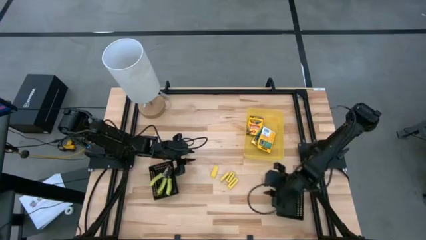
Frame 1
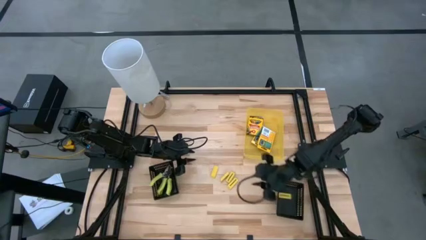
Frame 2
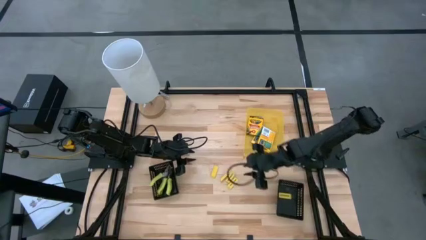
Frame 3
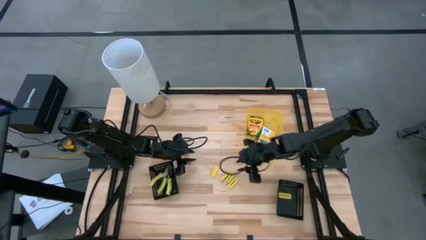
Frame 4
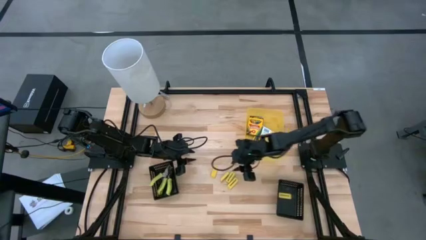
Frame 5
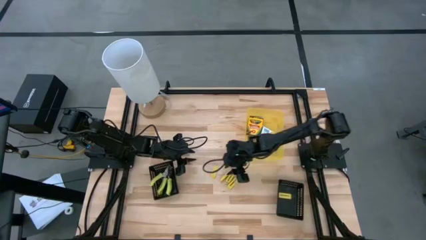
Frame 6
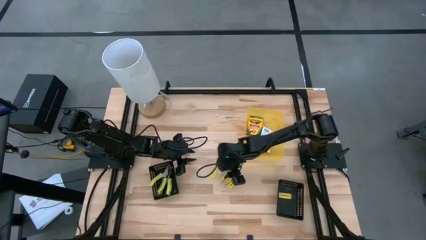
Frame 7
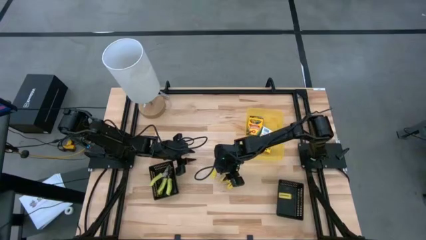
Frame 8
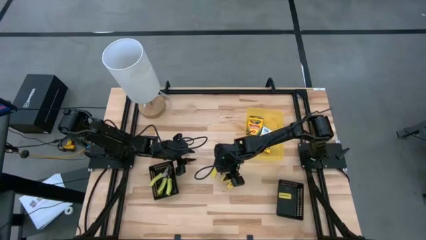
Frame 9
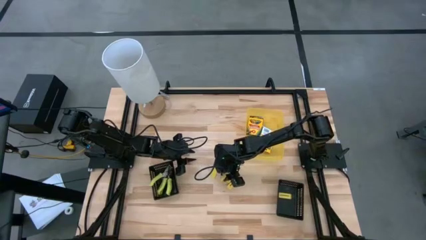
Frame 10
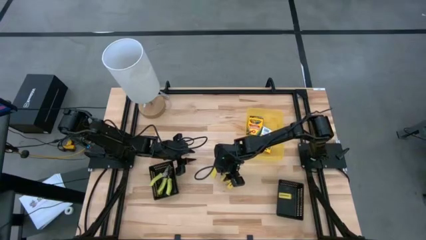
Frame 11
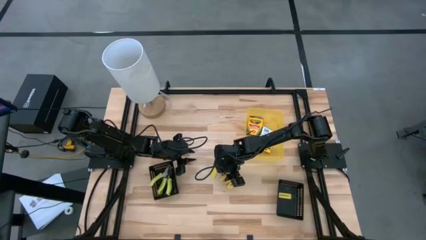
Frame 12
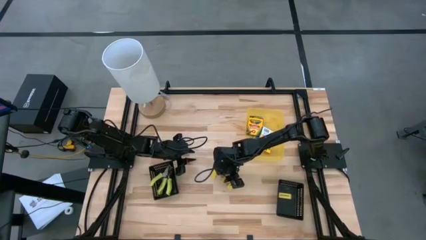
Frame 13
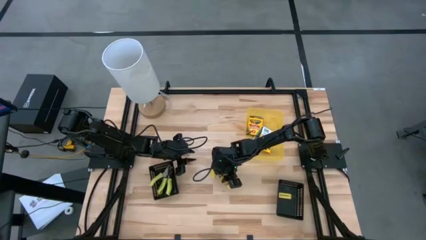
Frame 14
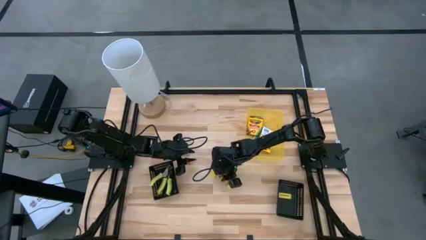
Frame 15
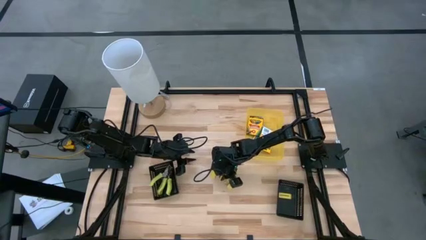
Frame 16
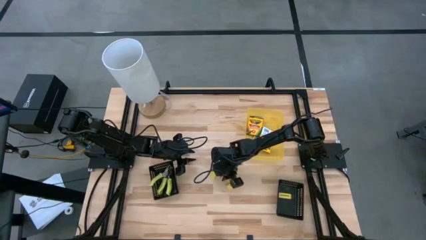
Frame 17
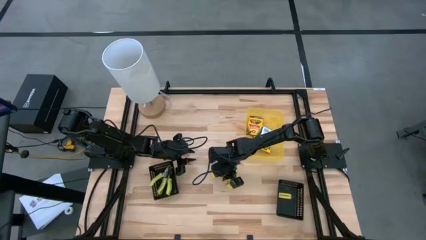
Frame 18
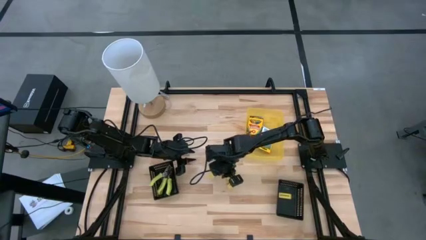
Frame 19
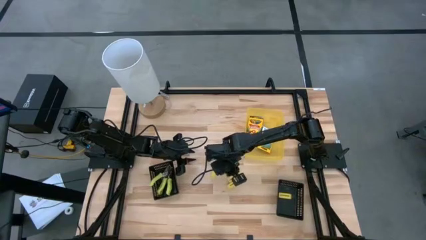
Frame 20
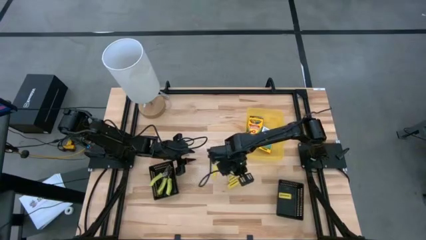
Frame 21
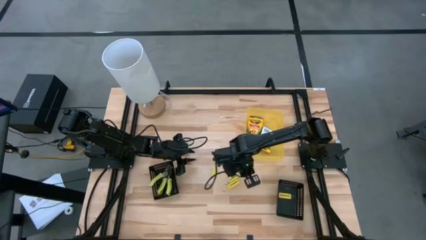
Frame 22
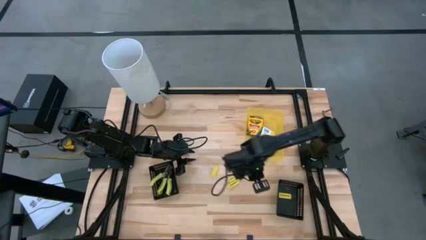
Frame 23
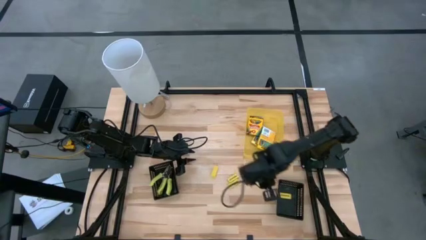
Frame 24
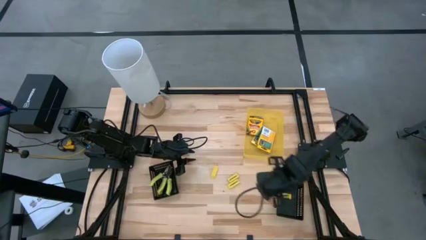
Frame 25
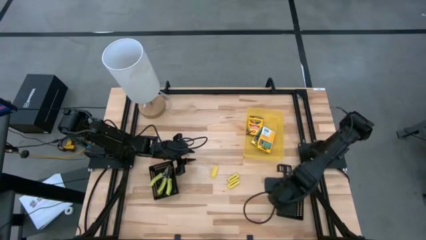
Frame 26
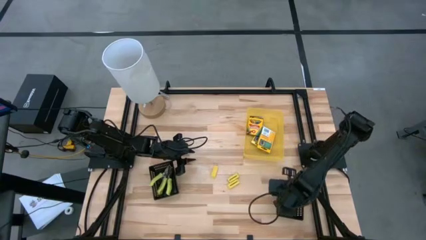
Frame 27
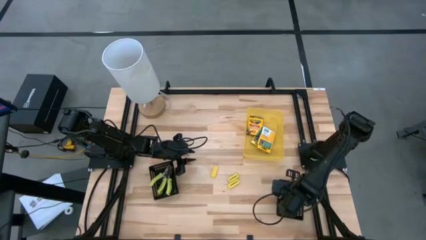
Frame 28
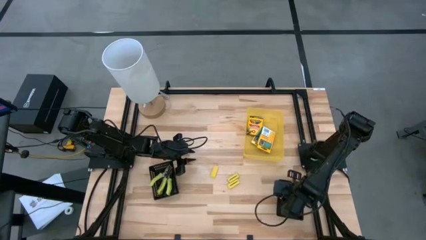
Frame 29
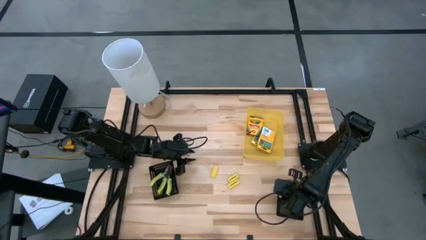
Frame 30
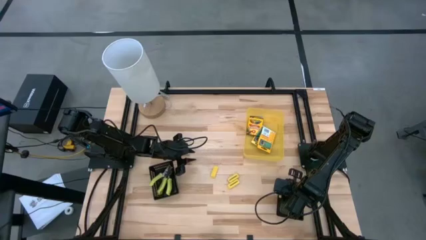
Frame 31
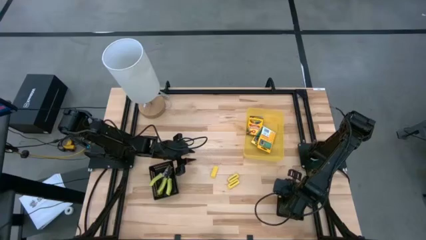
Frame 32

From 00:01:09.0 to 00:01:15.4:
Task: Pick & Place School Supplies
Put the eraser into the right black bin

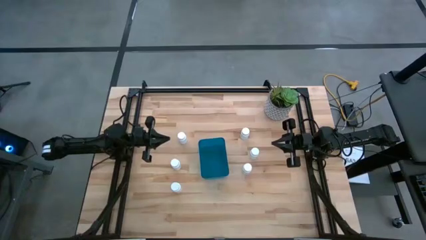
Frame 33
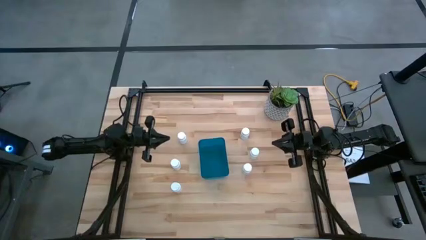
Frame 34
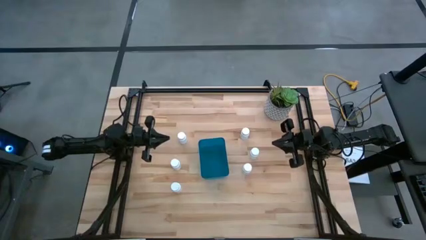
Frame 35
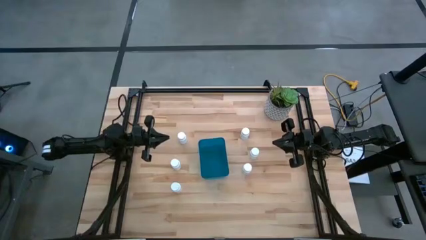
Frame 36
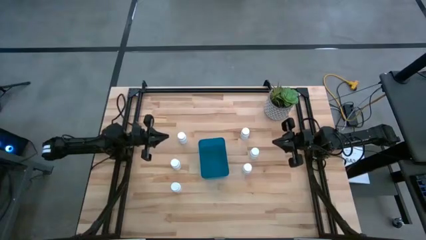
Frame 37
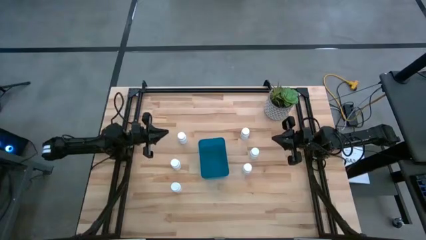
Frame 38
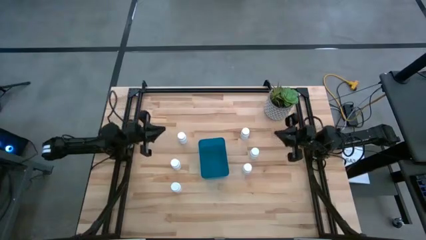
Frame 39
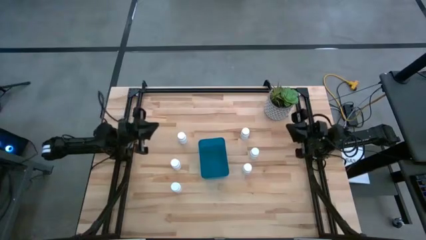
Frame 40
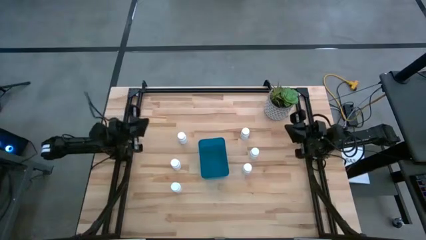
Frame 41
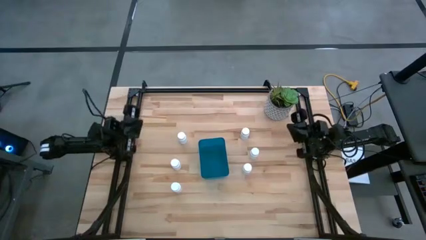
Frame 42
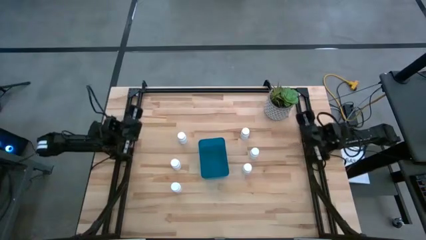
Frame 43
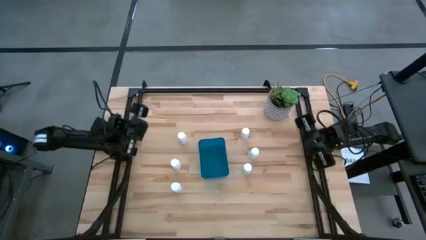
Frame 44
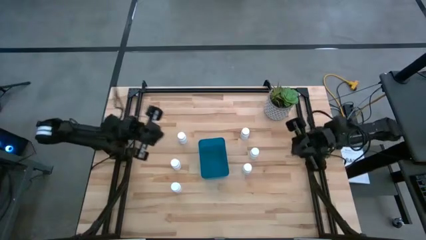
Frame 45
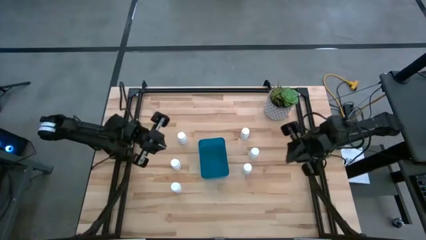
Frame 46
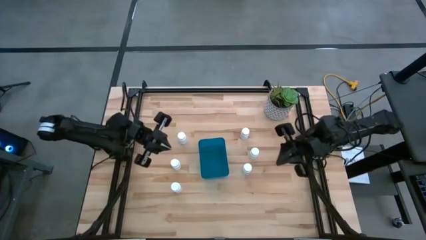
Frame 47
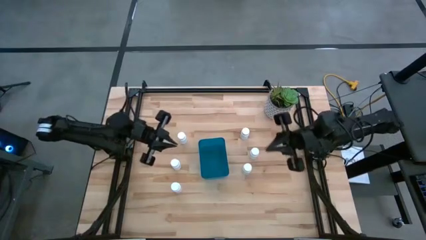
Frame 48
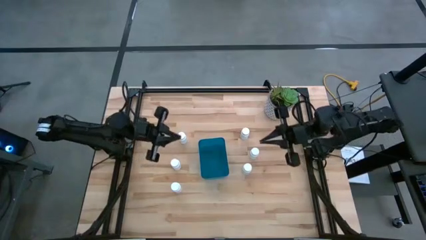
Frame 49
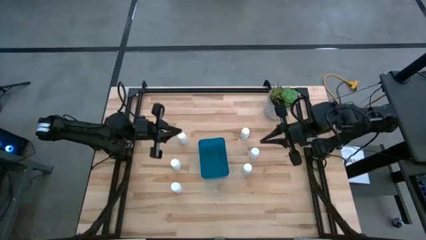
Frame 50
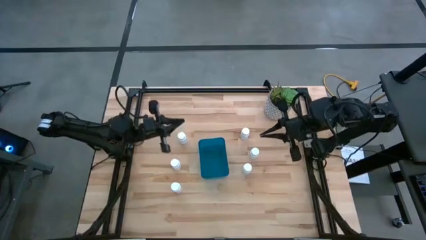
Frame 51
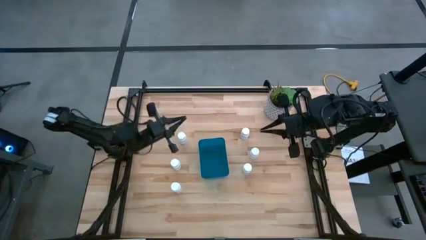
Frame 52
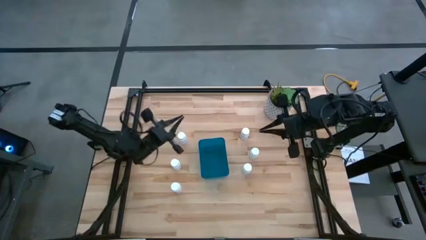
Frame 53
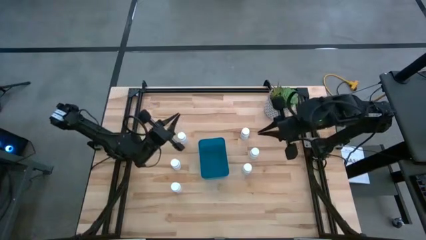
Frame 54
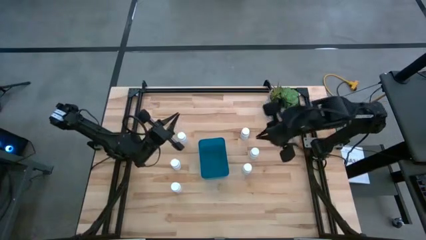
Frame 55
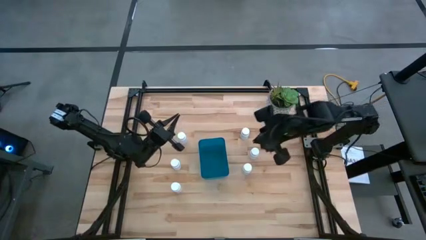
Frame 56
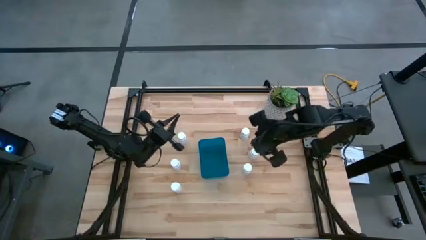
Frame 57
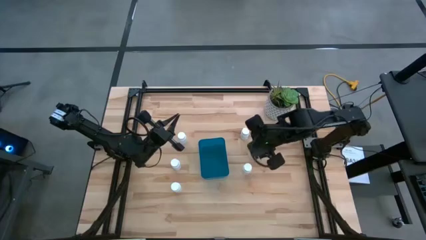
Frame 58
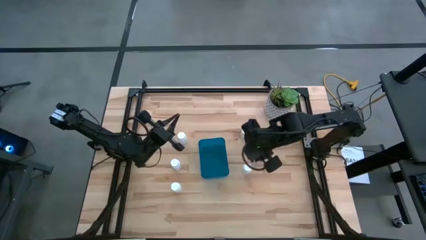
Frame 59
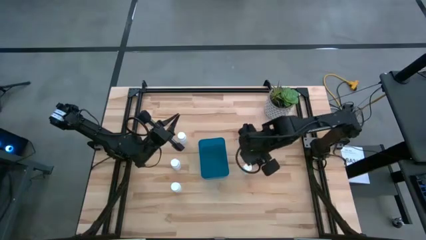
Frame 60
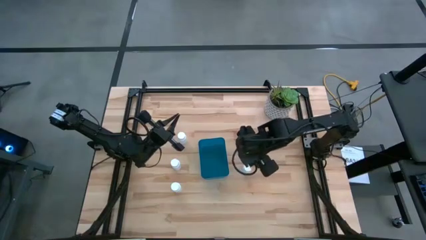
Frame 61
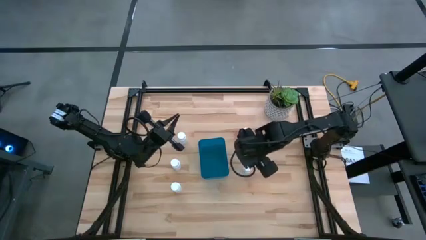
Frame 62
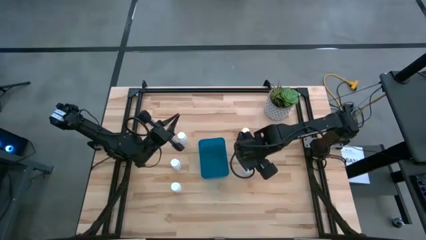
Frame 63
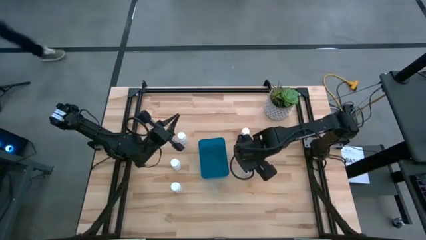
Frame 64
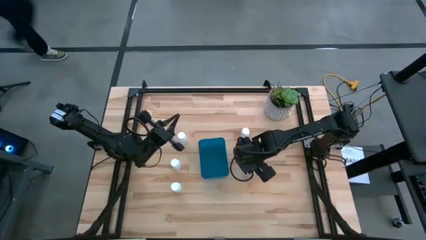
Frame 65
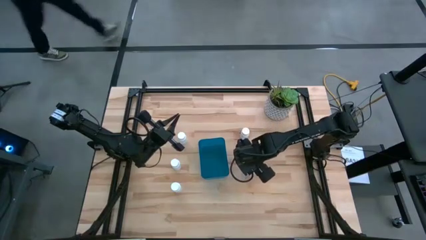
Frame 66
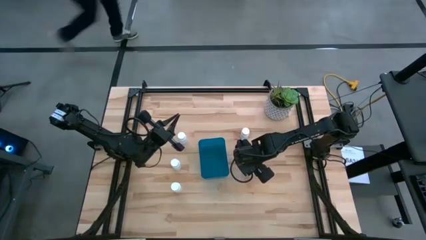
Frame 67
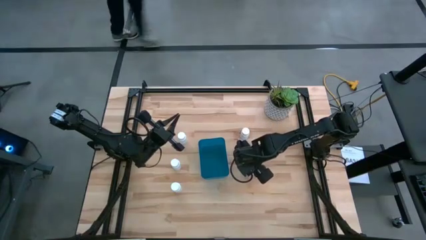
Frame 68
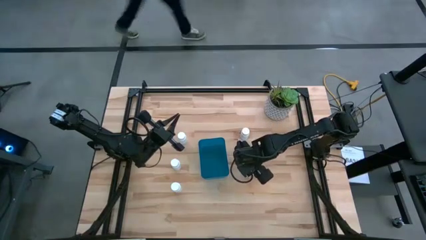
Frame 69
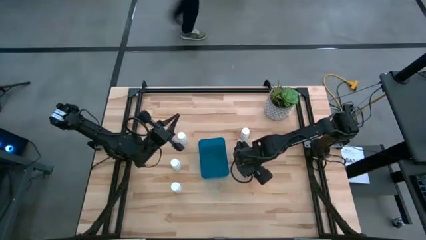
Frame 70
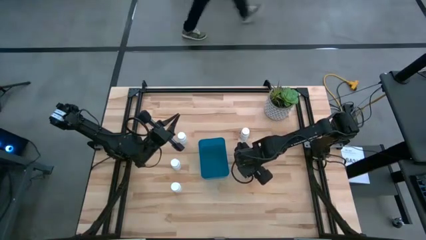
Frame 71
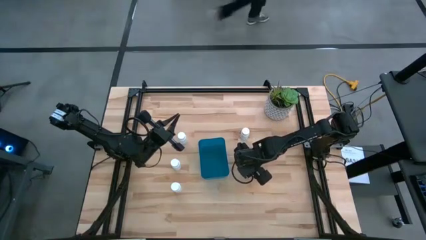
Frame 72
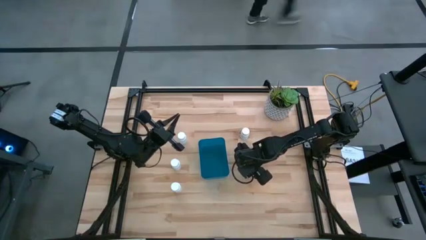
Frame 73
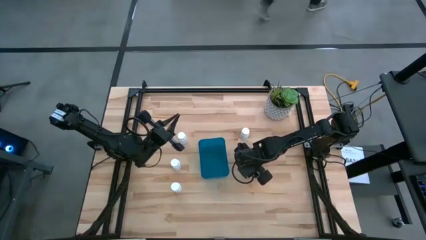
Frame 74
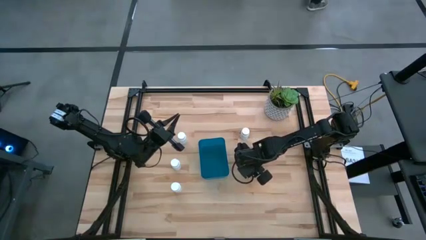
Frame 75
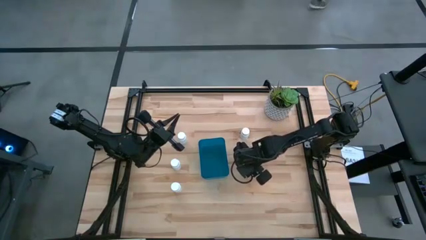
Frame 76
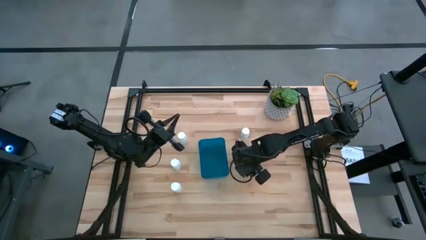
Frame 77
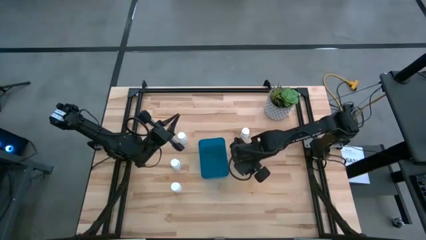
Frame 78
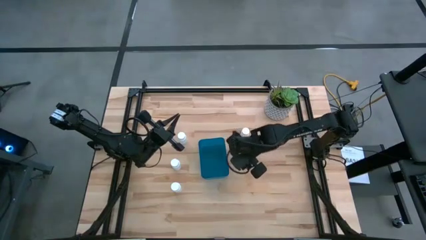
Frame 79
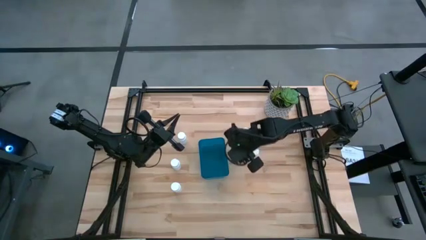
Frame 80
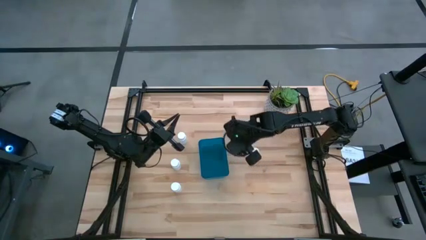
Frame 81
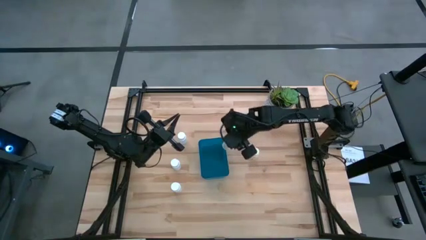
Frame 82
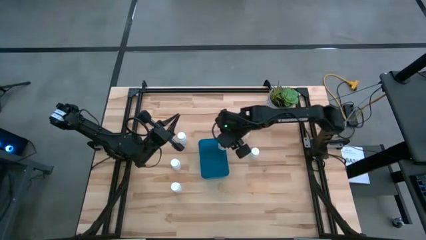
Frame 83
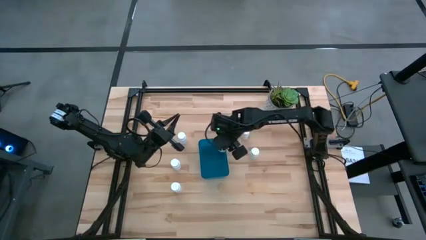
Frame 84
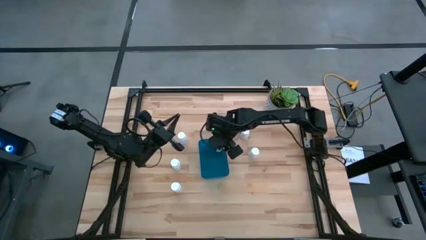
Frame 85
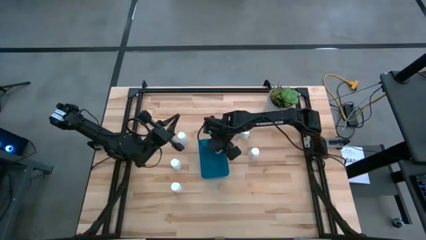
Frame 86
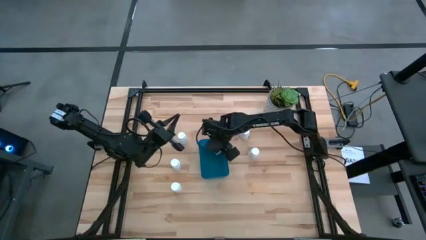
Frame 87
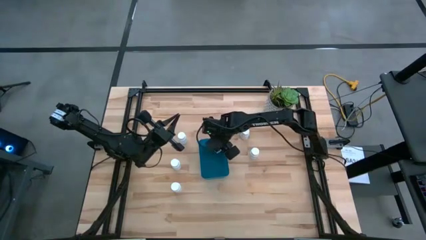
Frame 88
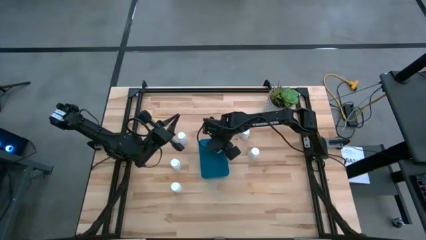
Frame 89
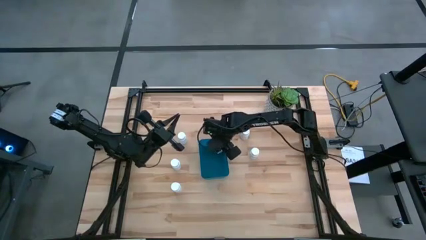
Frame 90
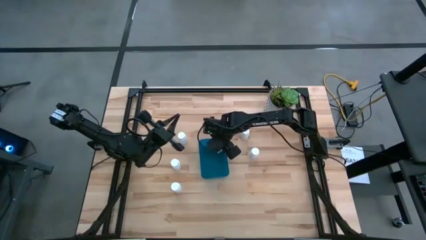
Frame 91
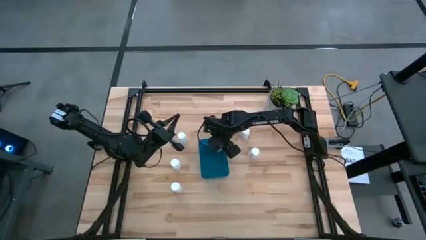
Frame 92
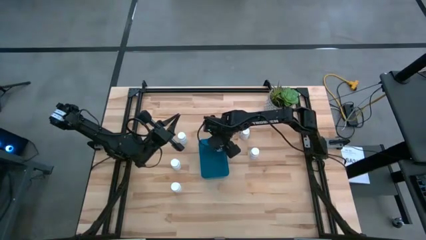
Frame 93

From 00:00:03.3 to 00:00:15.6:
Task: Pick and place pill bottles into a basket
Put the white pill bottle into the blue bin
